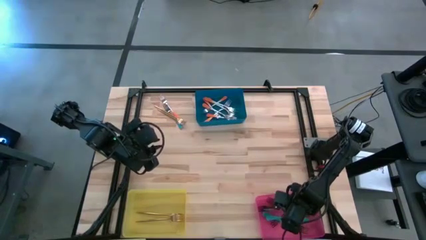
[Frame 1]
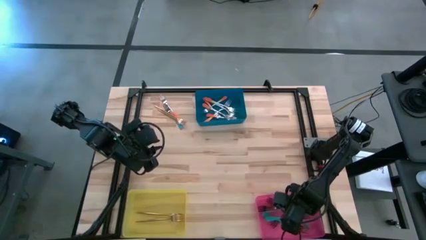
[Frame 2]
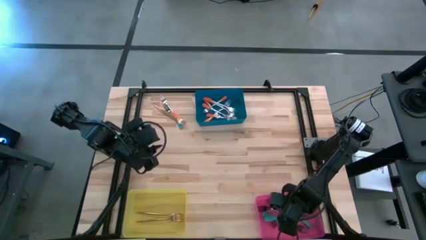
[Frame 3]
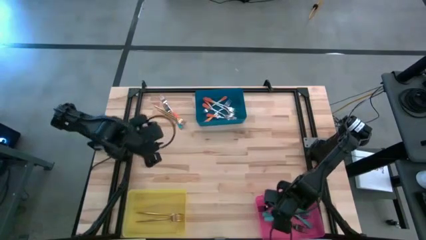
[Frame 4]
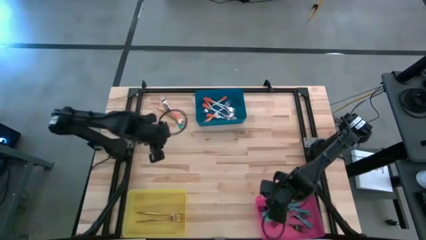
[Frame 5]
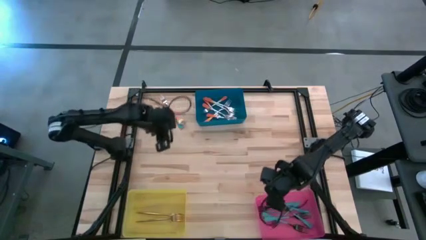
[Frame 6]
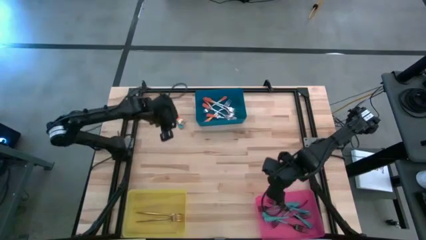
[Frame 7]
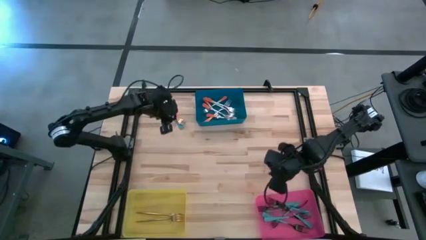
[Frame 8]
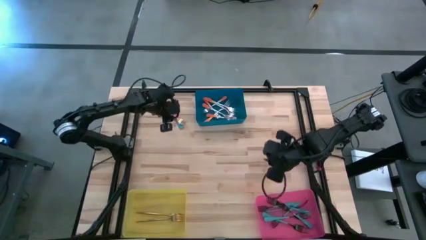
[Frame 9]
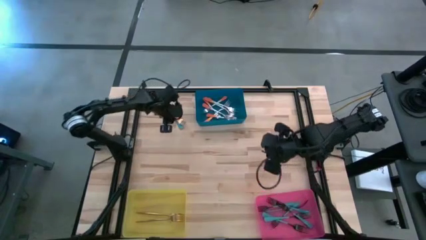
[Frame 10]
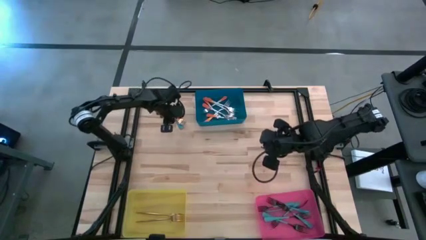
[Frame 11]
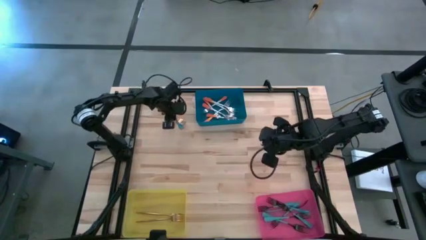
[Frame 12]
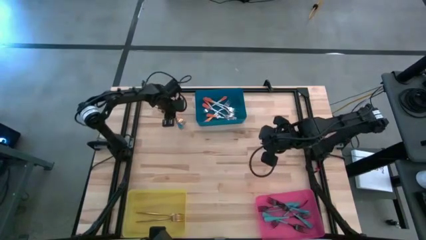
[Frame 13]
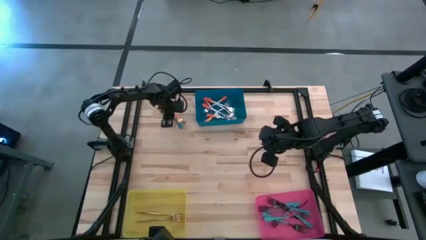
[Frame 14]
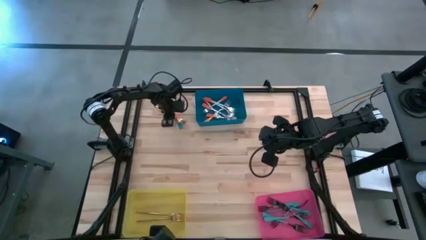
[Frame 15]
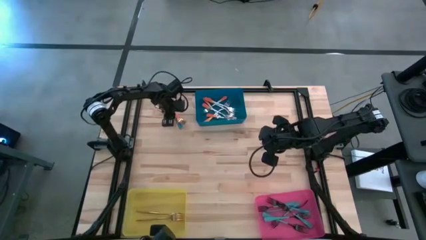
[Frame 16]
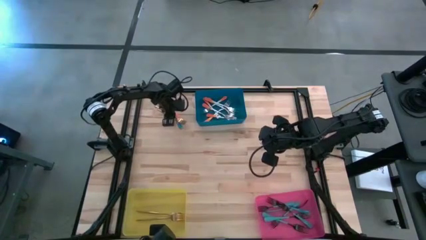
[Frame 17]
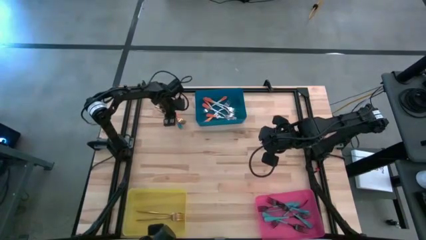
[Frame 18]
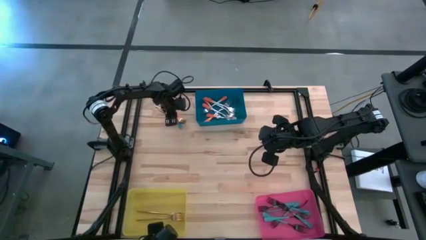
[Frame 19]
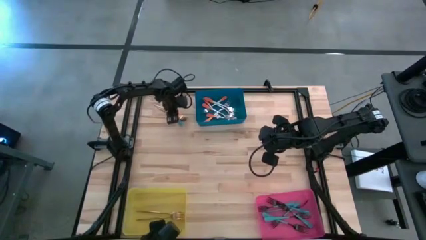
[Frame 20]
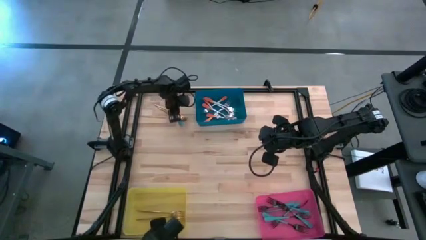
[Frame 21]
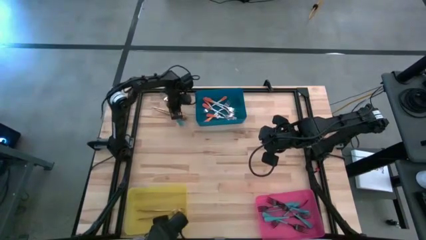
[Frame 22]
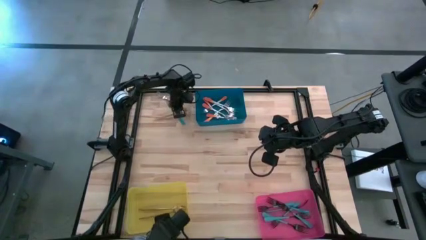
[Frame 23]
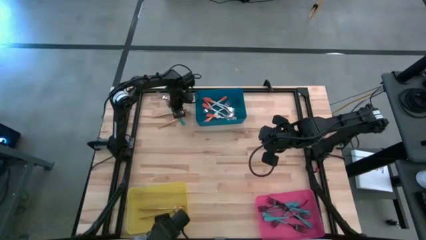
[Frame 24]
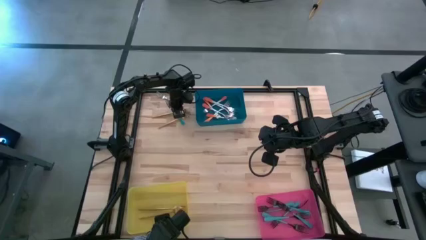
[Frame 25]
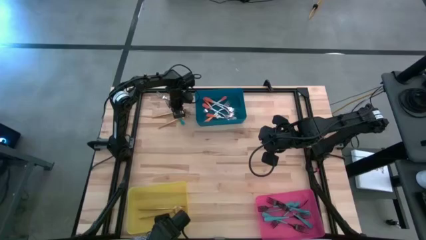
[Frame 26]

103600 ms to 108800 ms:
Task: Sort silverware by color (type)
Put the gold fork into the yellow bin

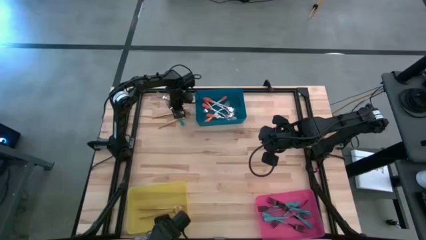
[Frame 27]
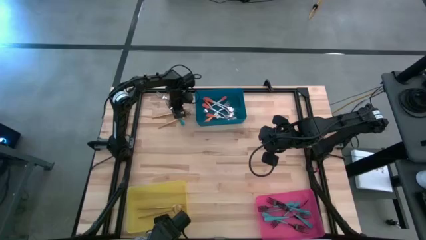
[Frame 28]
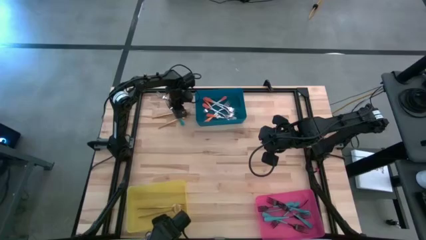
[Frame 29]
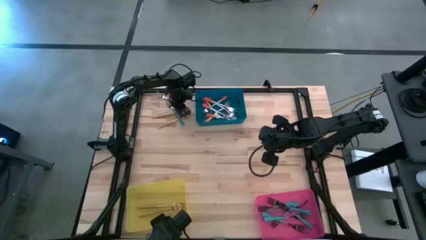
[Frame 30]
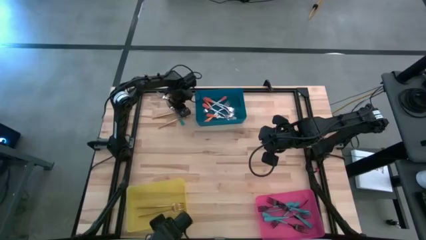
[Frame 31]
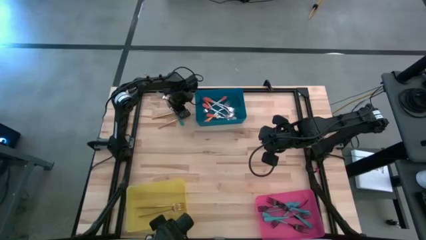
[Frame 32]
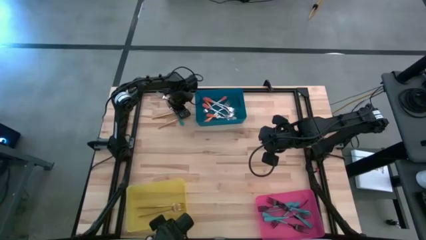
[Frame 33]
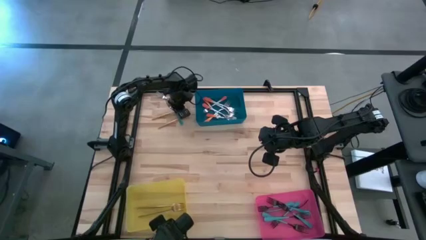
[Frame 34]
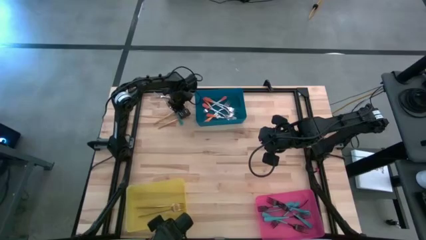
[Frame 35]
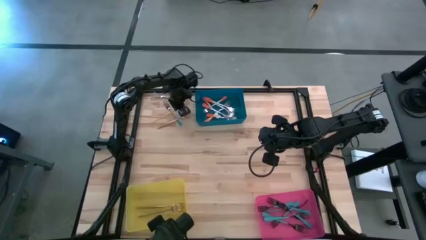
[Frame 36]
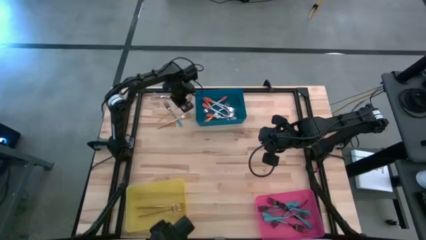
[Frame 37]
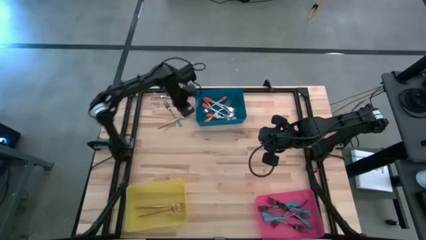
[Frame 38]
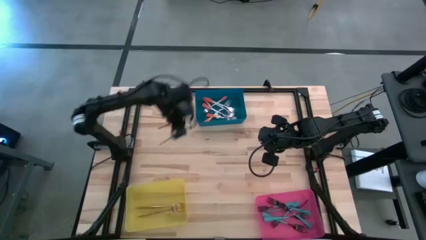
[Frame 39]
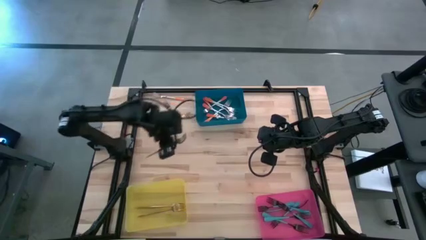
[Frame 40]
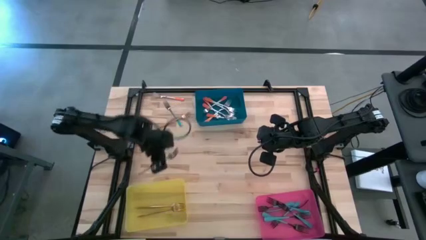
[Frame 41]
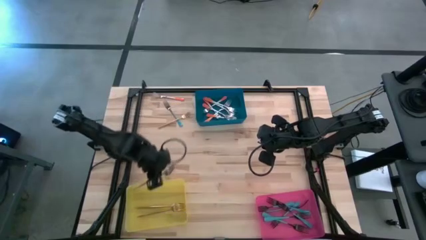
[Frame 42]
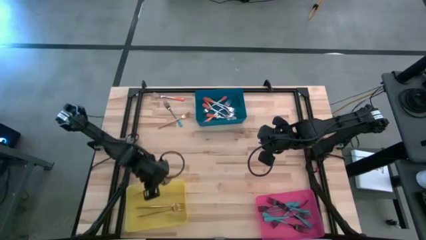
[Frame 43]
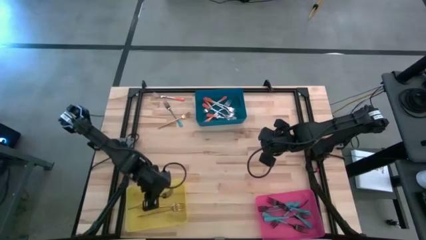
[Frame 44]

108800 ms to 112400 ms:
Put the gold fork into the yellow bin

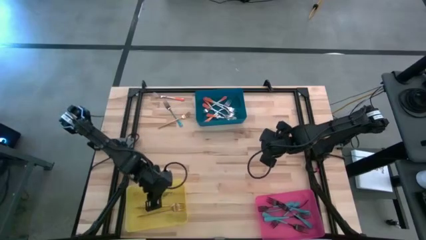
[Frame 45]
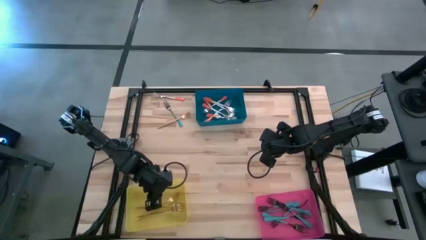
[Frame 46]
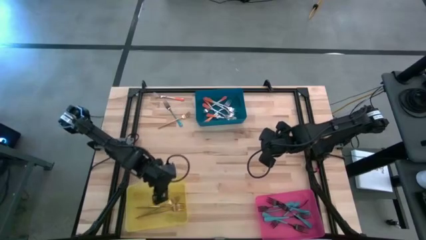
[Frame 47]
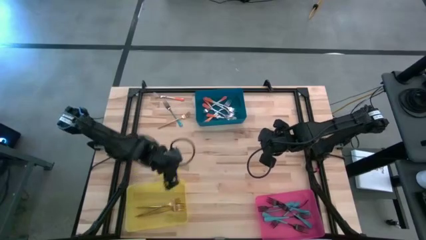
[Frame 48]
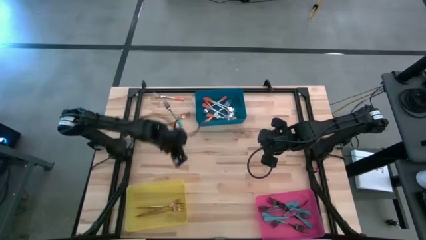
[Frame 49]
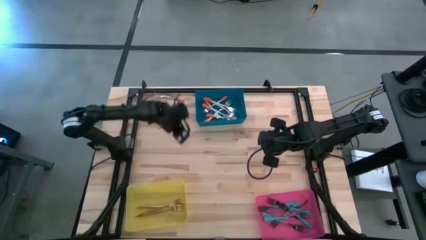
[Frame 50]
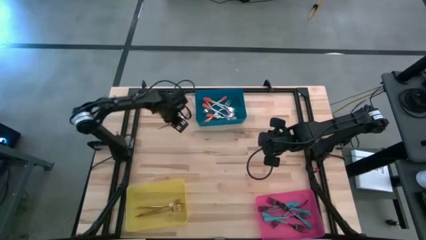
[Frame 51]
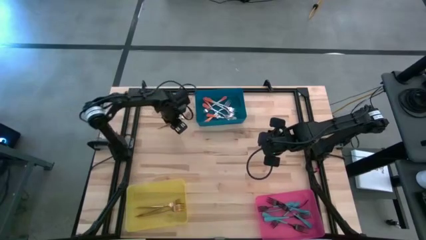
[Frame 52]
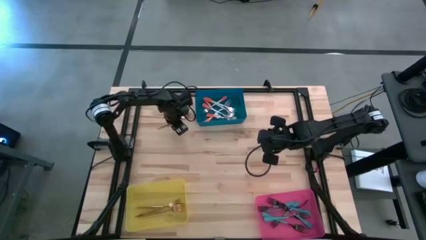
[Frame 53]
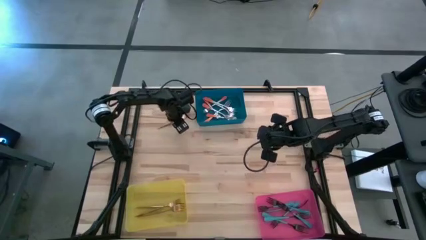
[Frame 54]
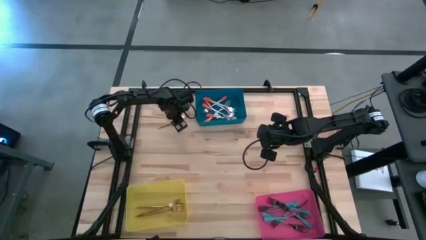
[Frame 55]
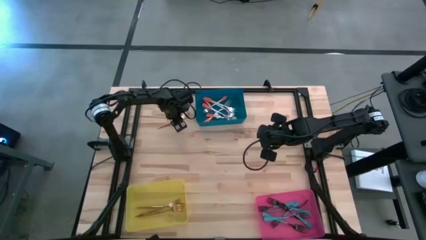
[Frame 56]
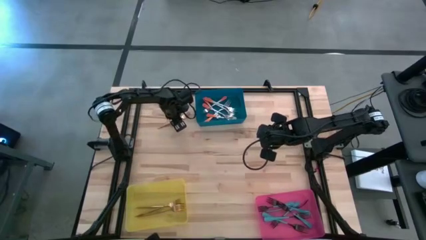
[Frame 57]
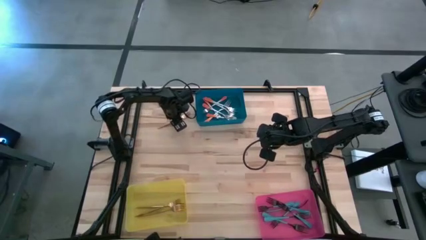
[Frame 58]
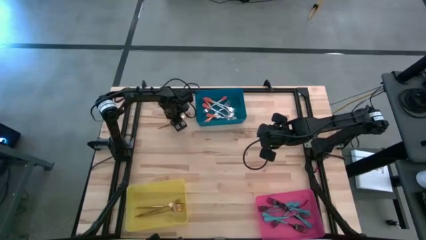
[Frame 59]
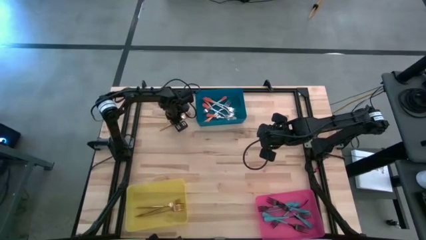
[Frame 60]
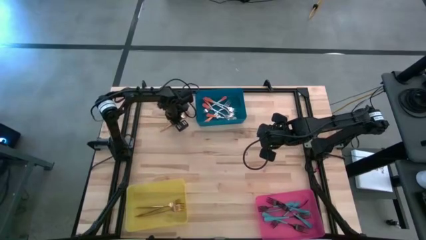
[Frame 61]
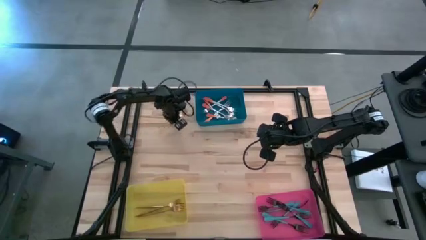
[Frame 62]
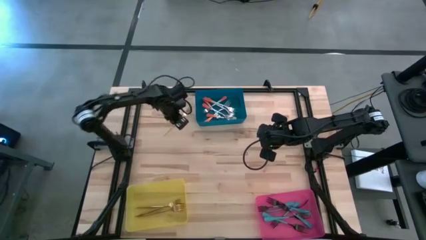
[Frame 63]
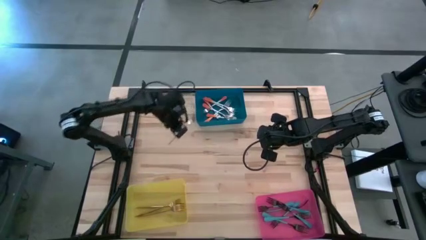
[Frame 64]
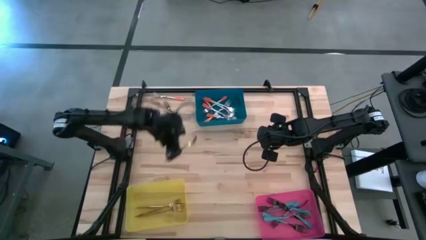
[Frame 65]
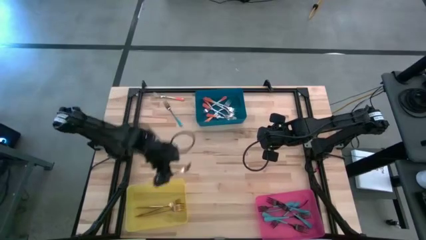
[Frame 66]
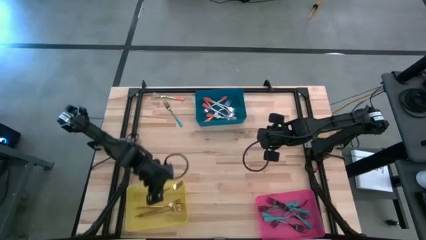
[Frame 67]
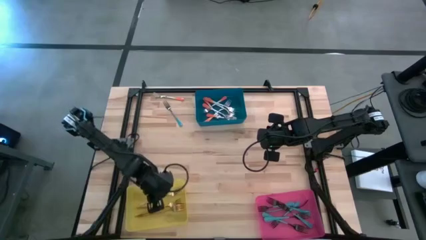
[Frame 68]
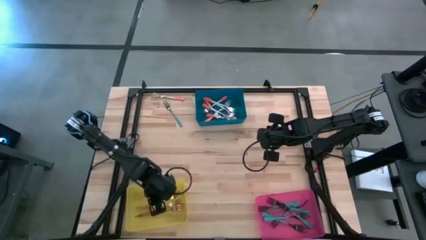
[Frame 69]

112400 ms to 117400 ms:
Put the gold fork into the yellow bin

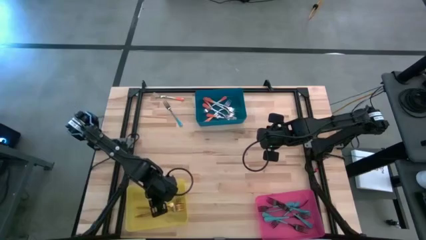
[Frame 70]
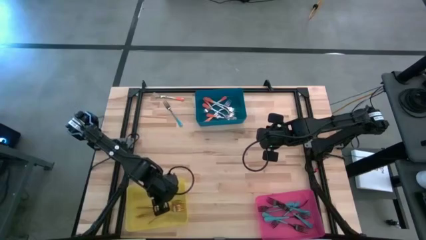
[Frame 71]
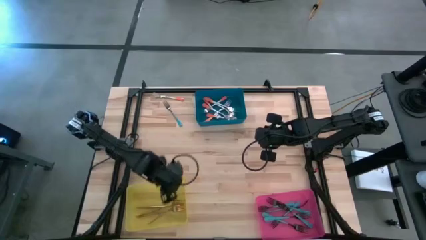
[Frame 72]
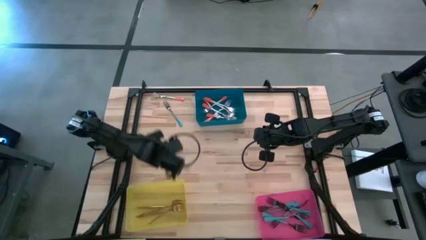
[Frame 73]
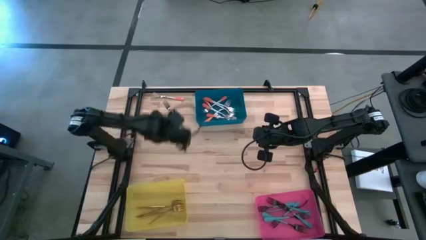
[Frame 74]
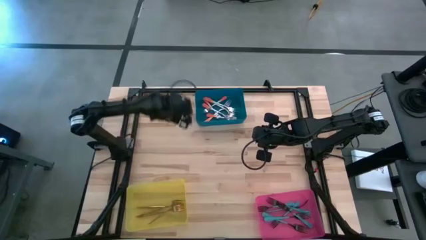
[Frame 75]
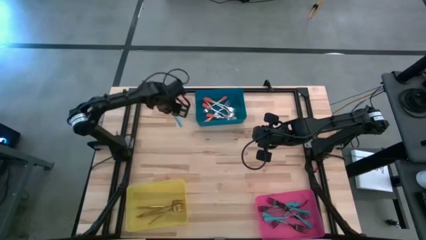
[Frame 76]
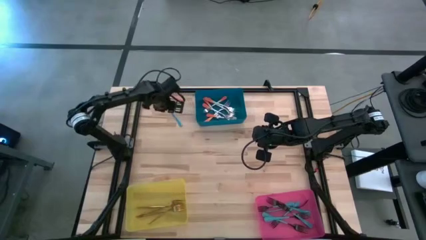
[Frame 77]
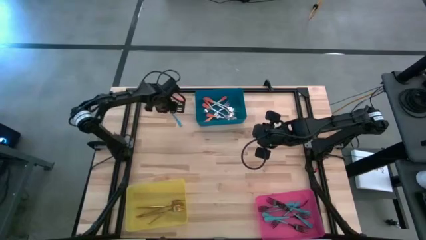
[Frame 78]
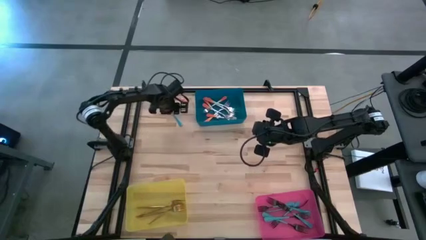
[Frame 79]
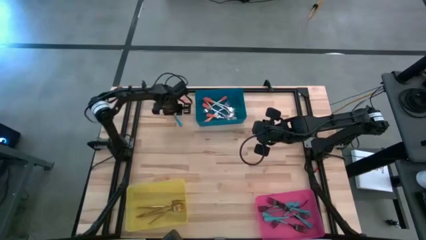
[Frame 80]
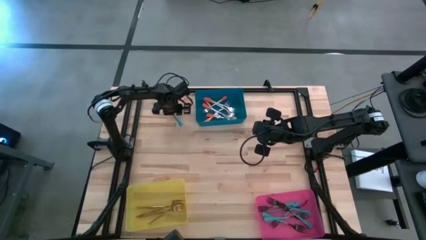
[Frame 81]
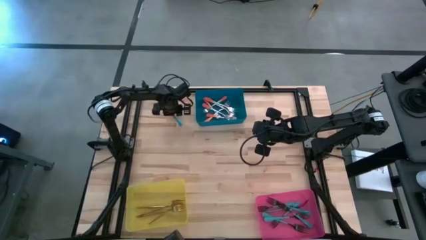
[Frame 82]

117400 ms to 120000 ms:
Put the blue fork into the pink bin

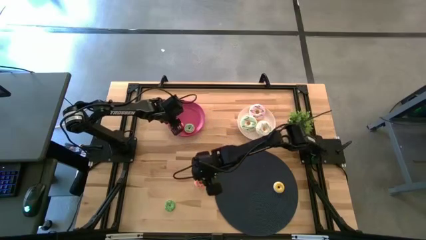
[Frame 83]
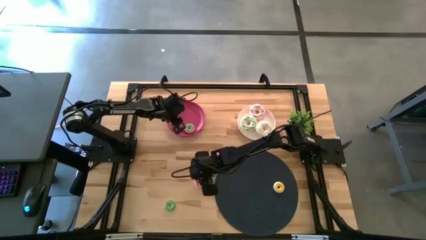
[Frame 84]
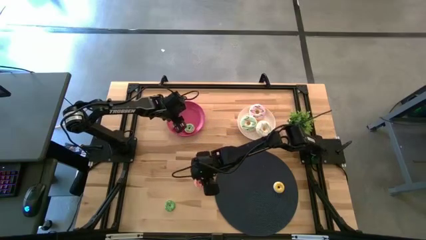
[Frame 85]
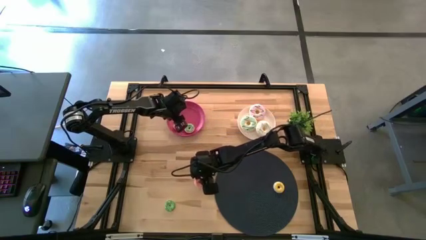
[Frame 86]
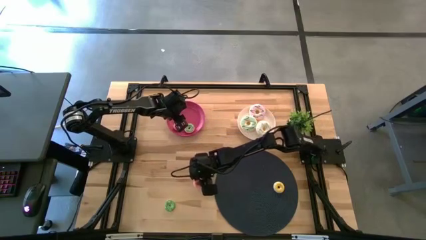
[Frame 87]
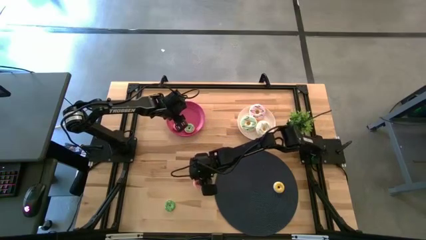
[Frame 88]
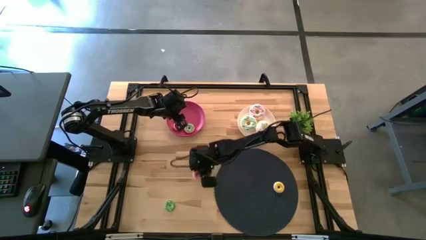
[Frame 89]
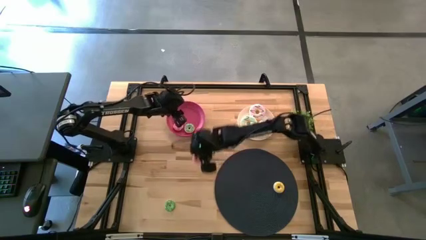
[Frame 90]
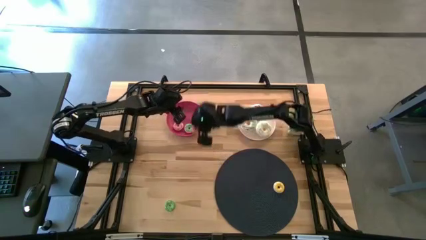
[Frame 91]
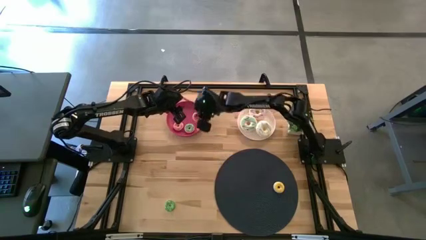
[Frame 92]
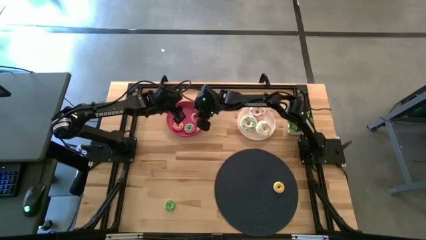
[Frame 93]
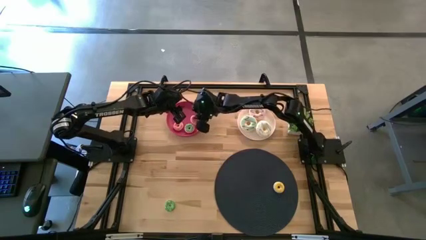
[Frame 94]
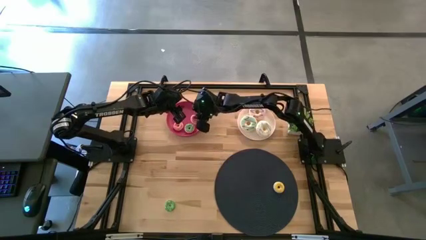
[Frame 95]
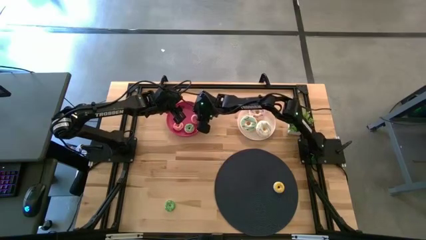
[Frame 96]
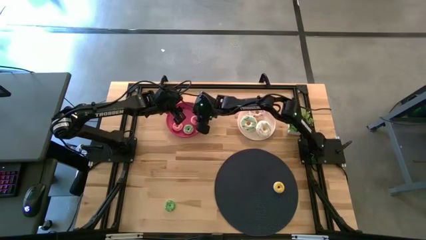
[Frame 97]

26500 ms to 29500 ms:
Task: Pick & Place donuts
Put the small red donut on the pink plate
